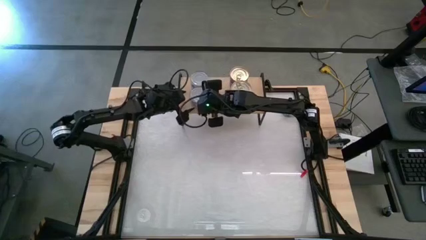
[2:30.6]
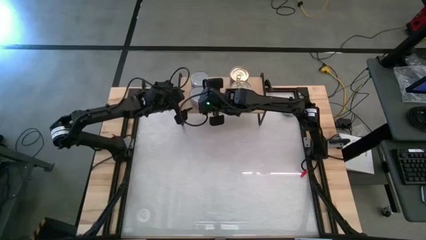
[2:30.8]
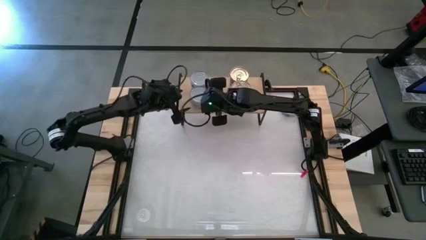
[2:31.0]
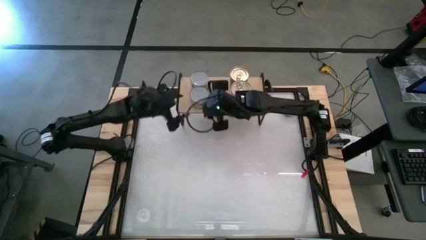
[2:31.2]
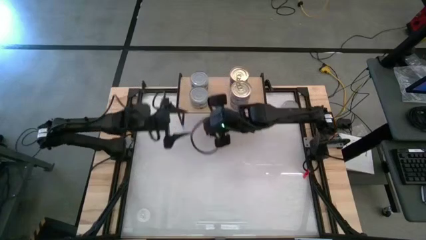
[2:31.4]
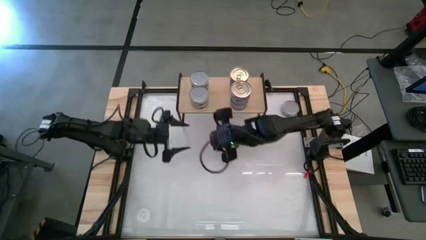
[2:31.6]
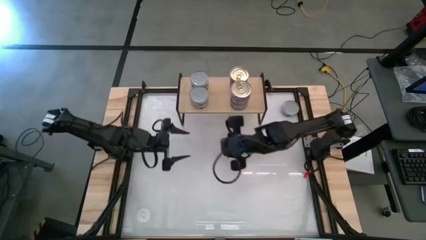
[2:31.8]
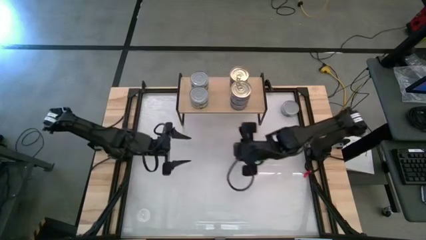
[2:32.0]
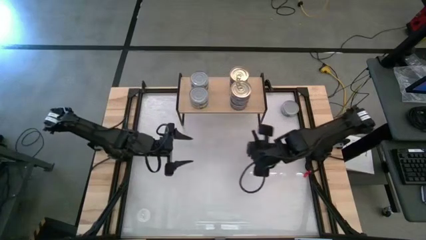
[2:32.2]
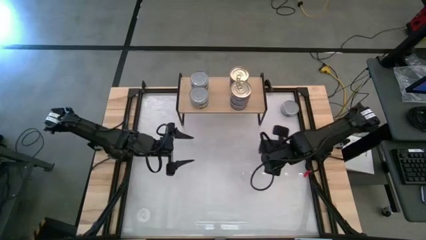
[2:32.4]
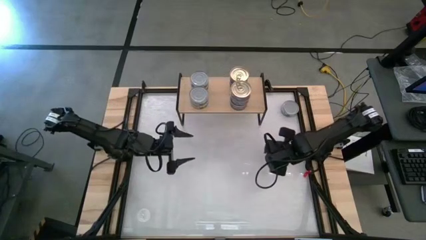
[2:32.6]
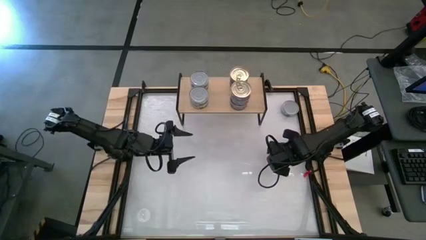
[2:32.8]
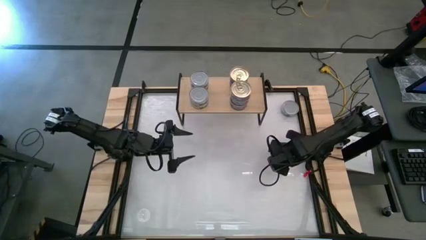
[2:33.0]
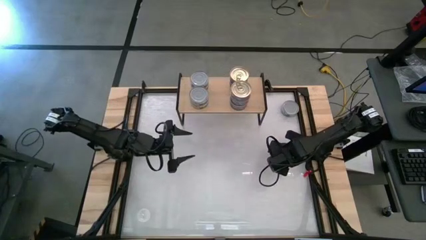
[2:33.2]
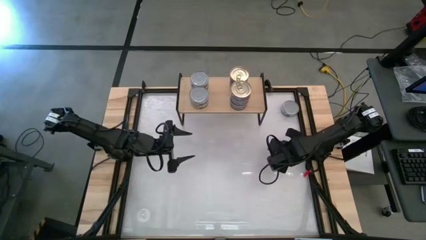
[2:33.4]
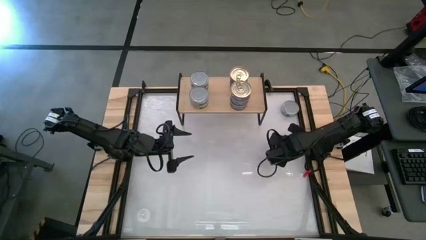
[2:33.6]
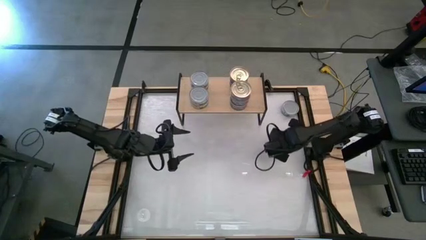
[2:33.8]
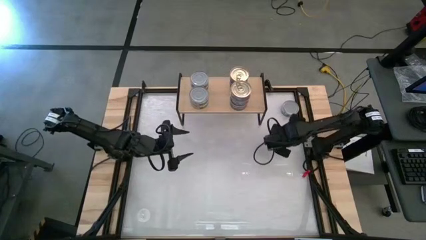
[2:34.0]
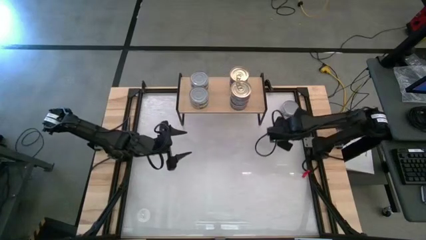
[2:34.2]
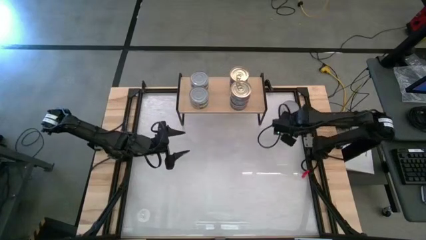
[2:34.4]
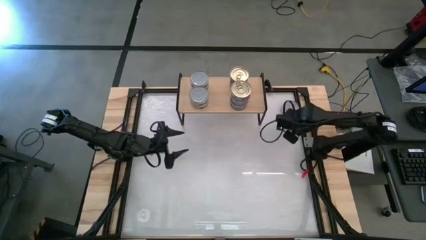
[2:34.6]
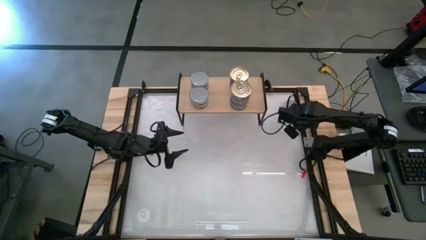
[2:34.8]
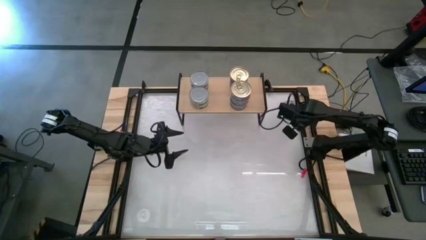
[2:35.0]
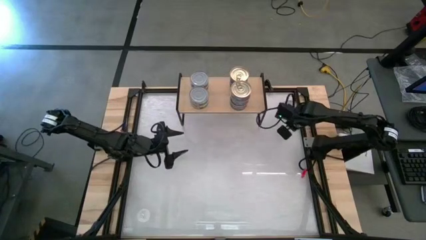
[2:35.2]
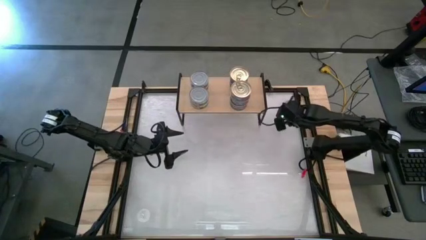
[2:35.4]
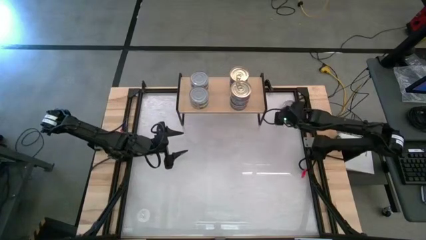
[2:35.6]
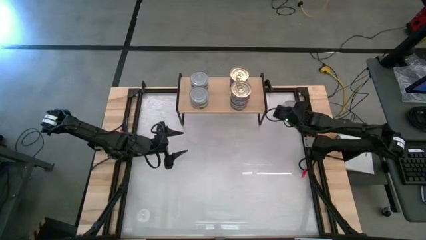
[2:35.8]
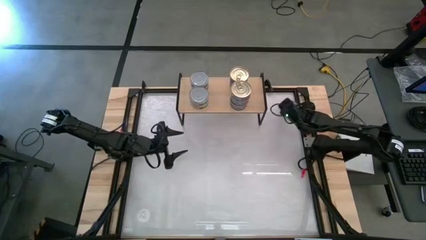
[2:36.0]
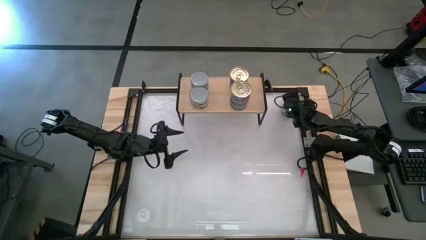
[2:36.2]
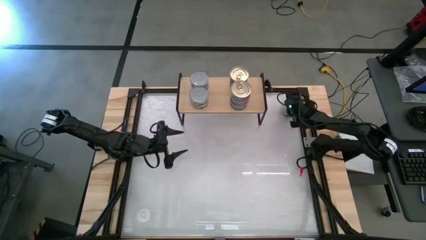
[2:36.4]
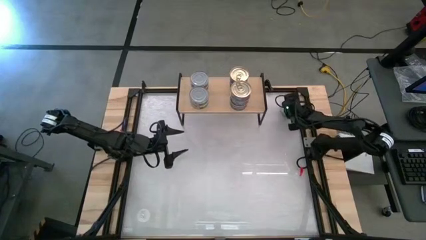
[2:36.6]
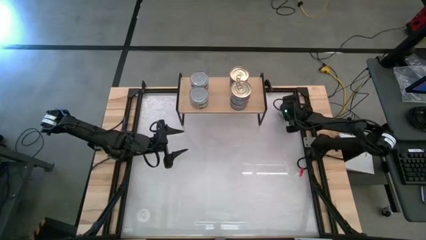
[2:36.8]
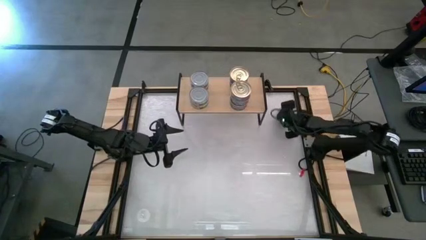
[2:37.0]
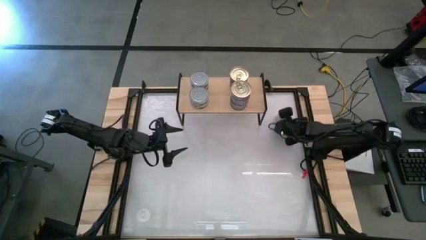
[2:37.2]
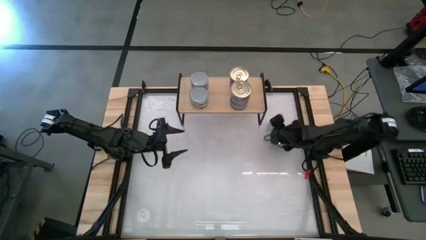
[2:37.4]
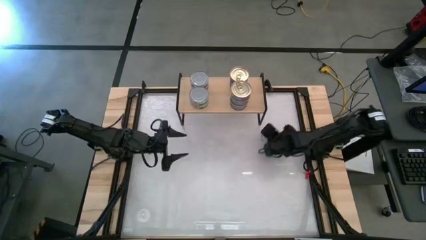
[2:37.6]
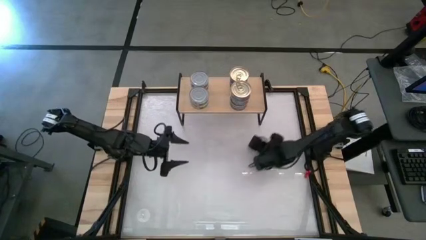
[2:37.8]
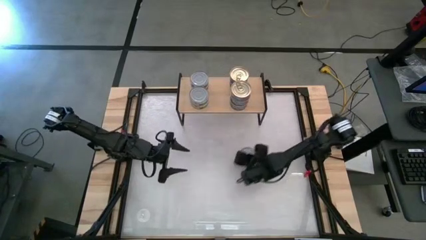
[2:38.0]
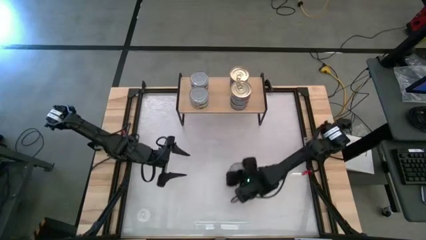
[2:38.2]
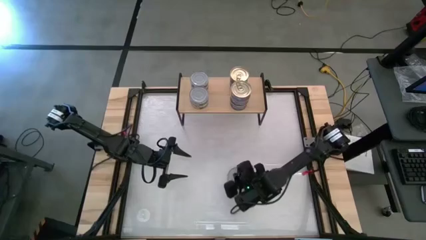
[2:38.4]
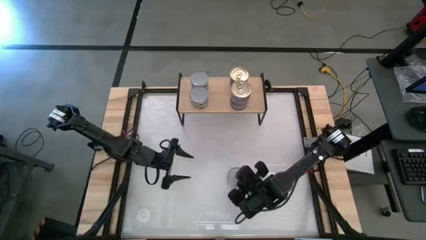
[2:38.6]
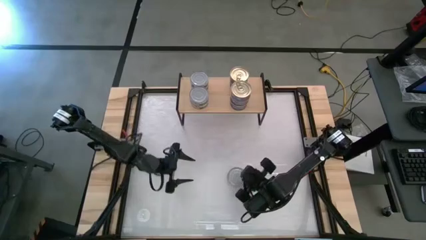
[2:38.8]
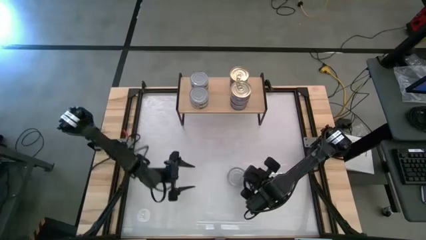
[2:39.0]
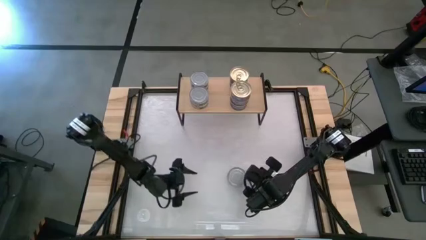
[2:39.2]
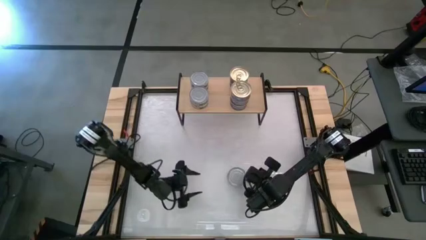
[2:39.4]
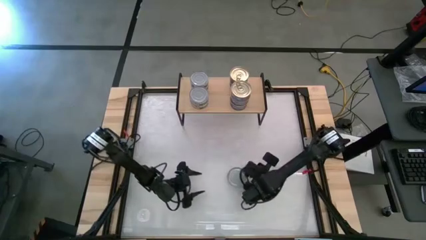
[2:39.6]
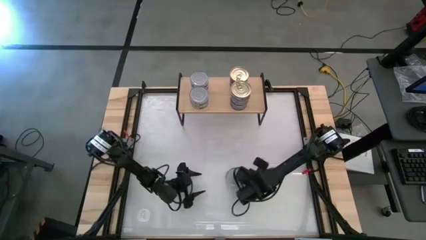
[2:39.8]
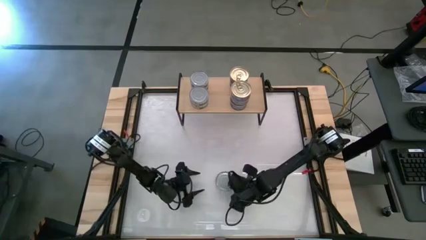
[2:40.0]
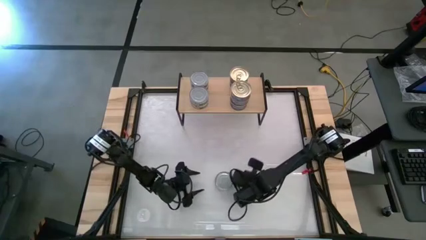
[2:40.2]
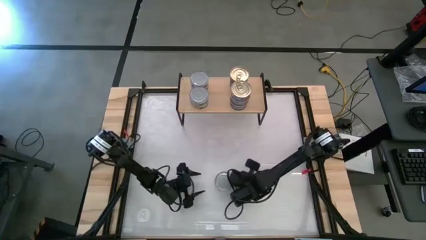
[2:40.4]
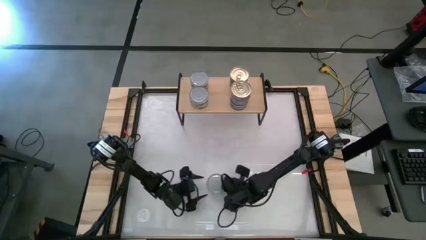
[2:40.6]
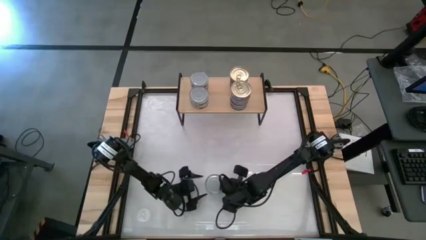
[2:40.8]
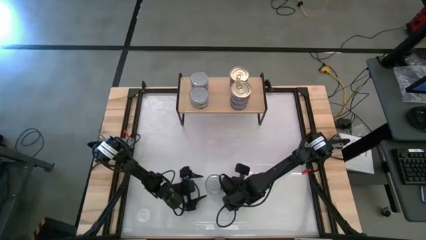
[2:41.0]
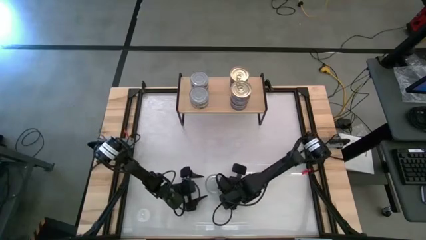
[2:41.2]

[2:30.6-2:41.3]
Task: Stack canned seafood by type on shelf
Stack the green tuna can on top of the other green tuna cans on the shelf

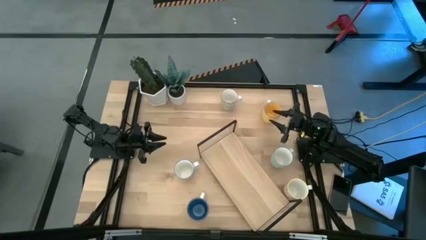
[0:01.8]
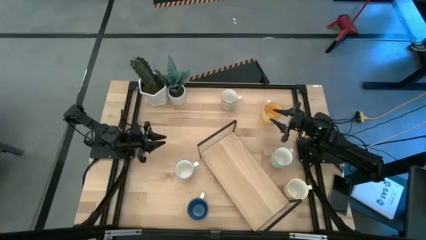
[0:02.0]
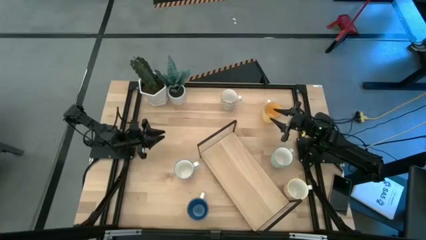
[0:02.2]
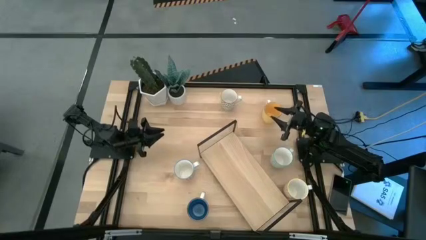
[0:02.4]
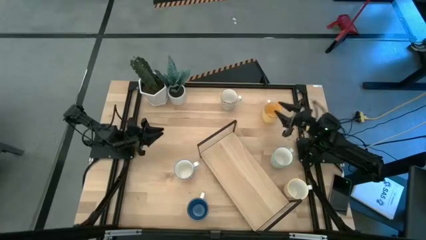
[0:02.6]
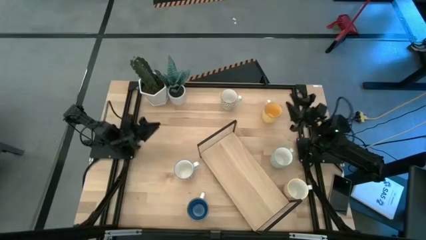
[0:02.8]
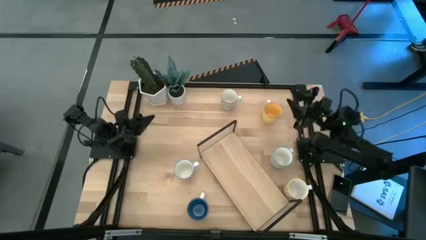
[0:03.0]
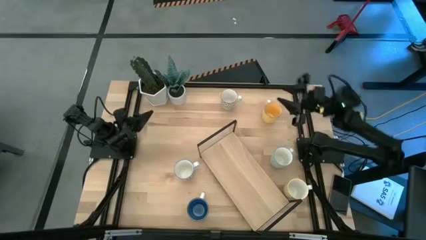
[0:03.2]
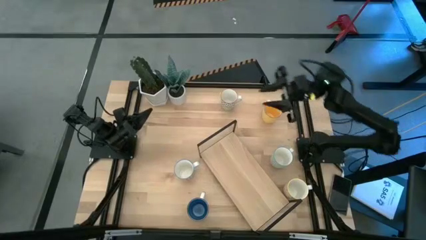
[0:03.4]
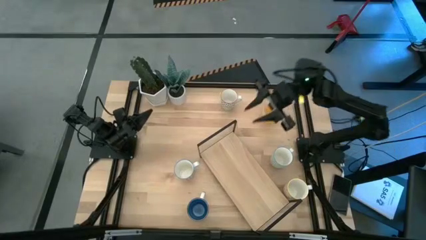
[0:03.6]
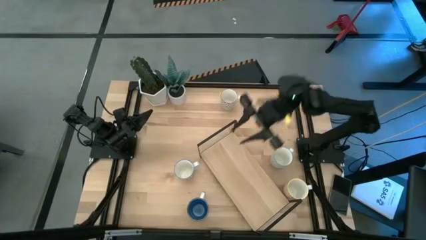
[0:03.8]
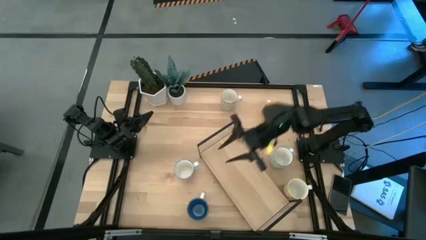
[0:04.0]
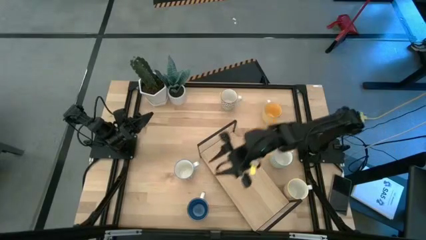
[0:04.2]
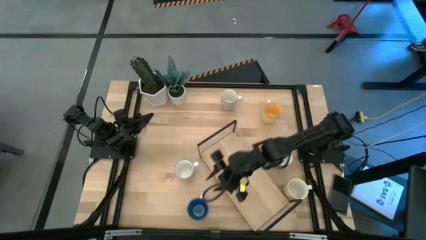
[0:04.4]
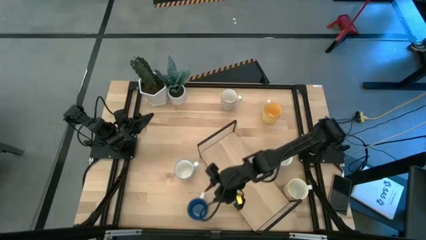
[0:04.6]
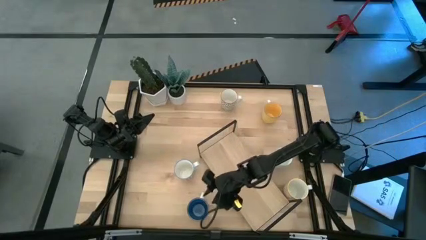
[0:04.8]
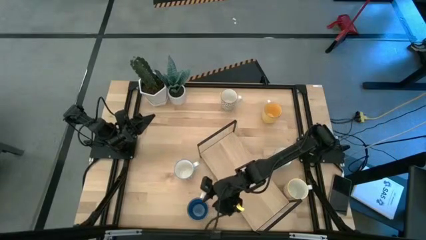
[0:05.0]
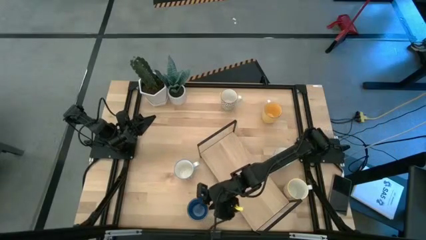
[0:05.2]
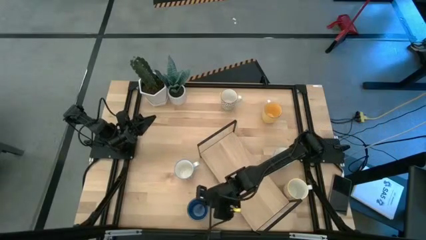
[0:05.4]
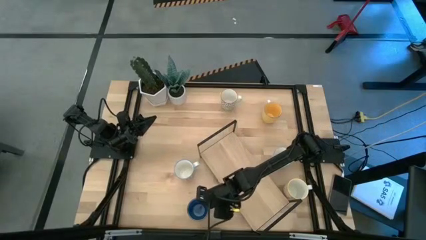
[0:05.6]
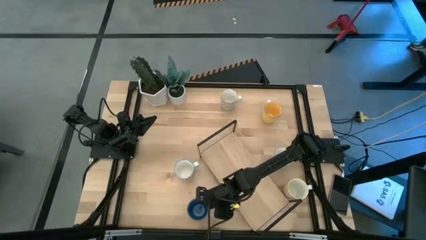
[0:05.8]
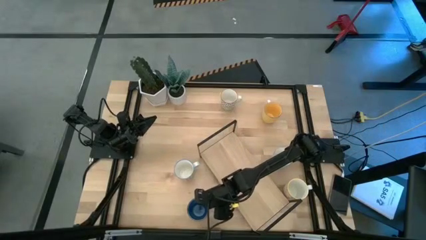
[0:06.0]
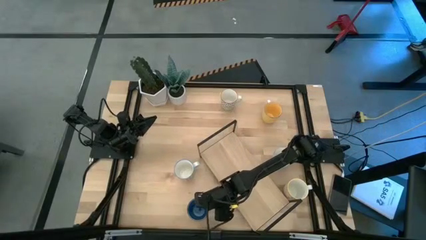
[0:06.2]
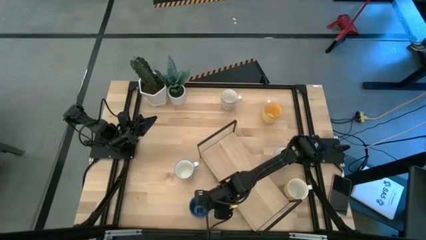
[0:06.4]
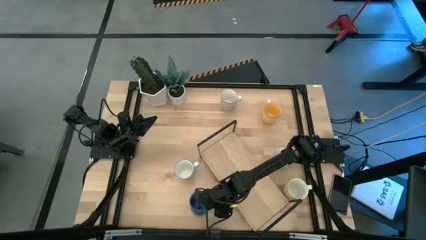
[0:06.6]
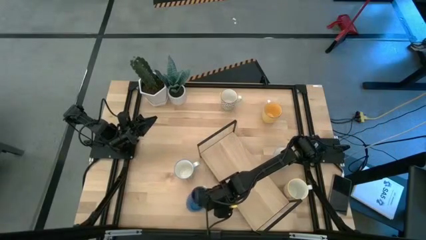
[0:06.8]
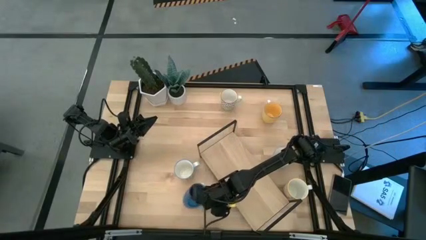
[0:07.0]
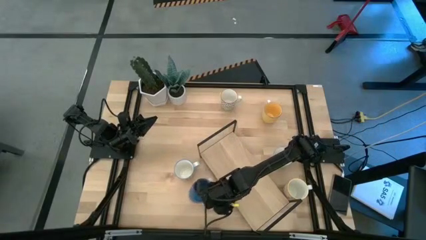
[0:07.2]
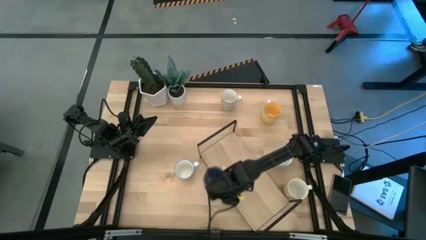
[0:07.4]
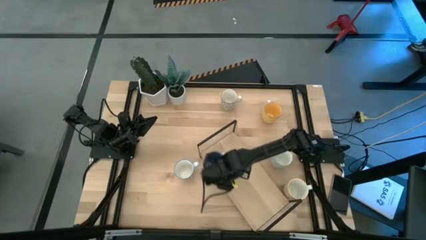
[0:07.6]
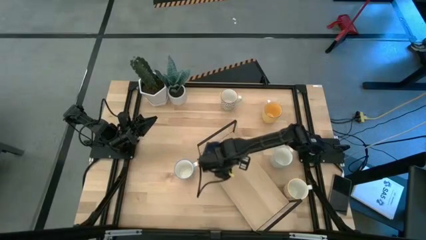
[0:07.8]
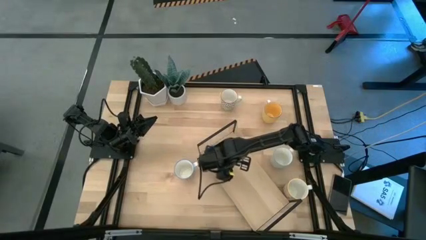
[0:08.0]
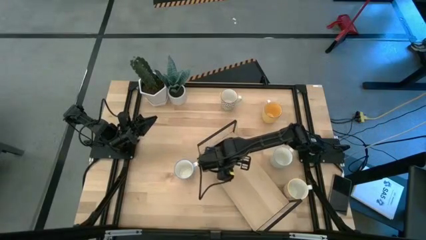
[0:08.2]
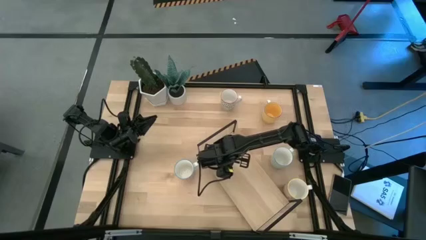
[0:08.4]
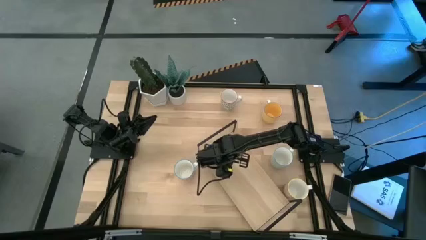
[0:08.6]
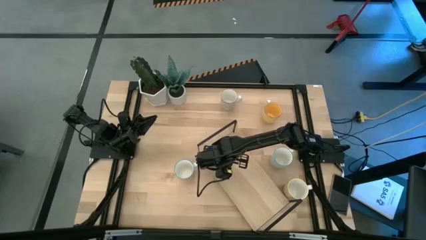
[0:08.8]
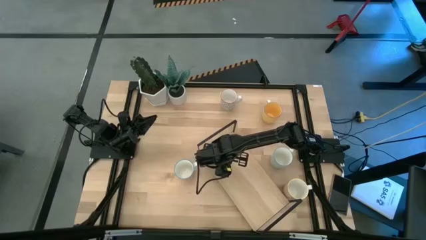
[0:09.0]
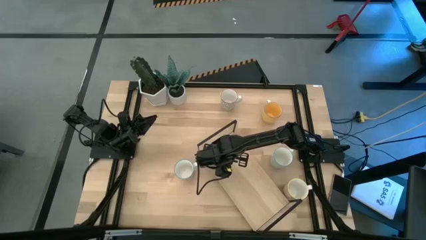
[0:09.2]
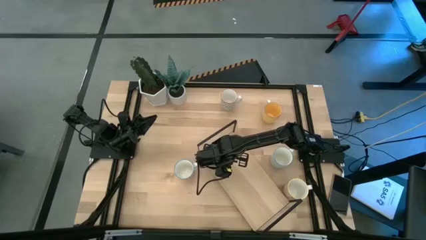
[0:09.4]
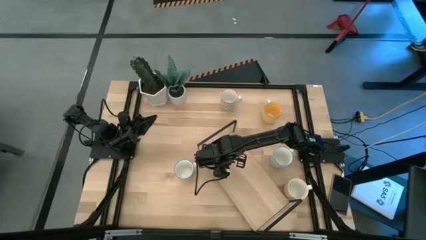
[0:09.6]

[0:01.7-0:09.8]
Task: Place coffee mugs
Put the blue mug on the shelf
